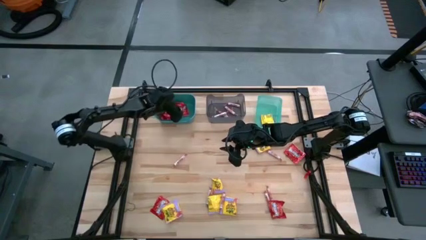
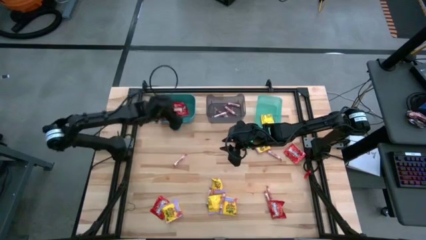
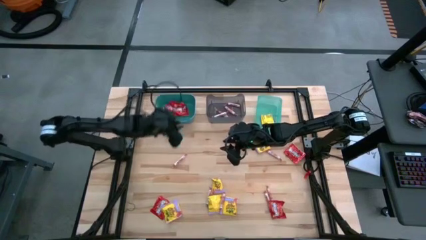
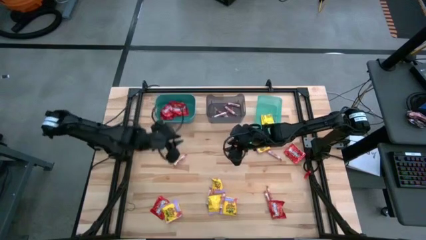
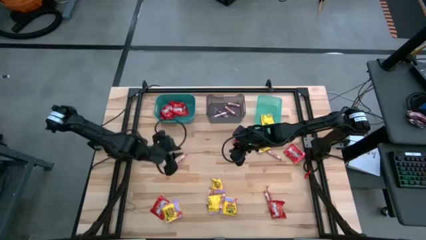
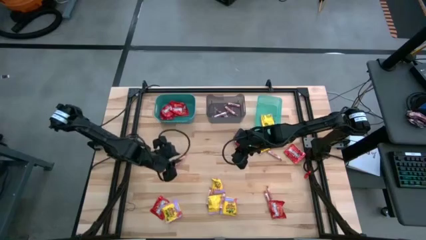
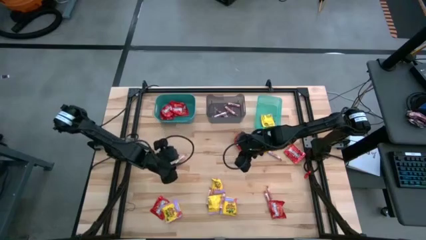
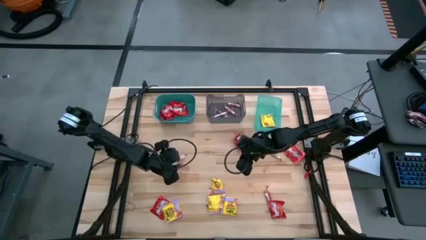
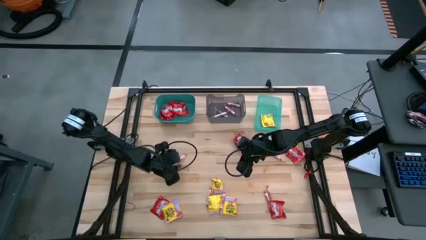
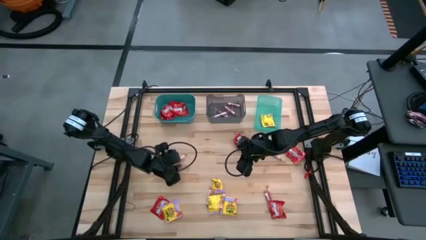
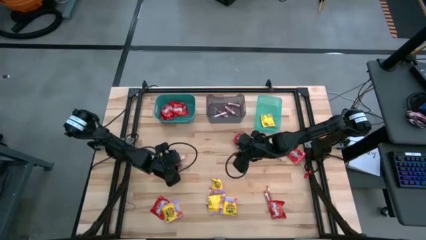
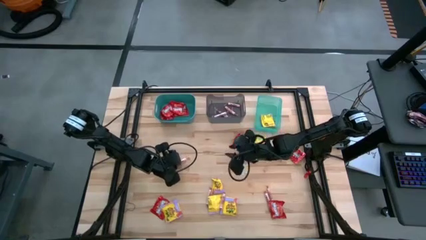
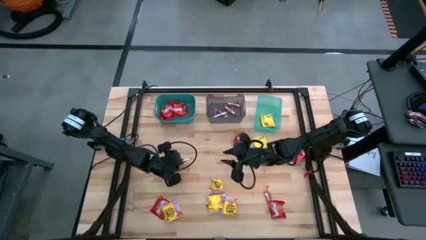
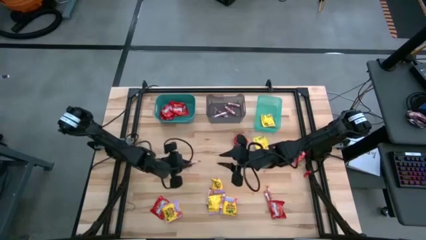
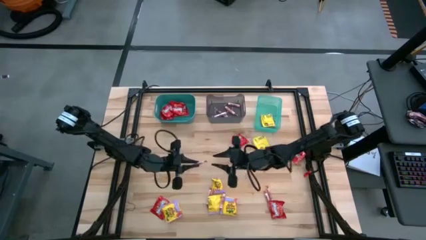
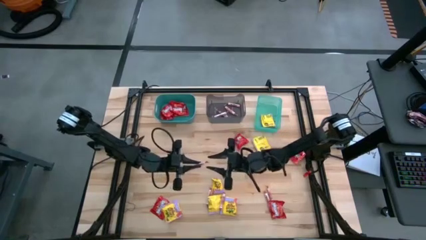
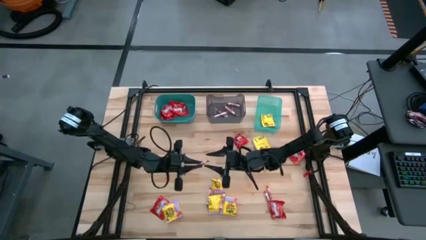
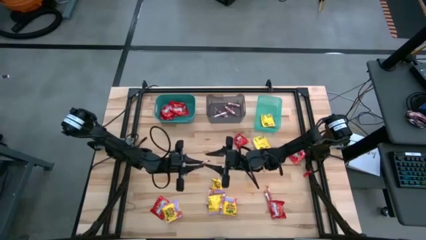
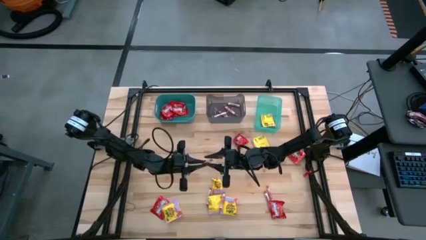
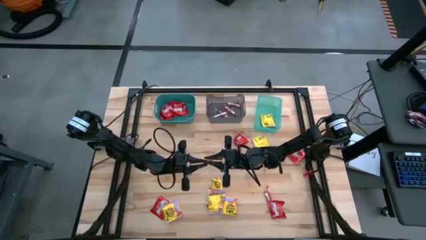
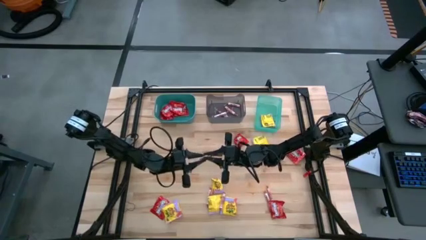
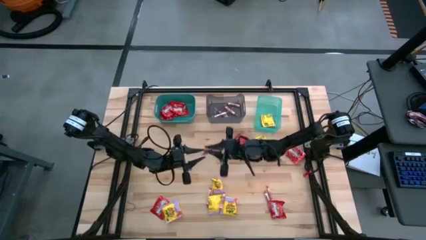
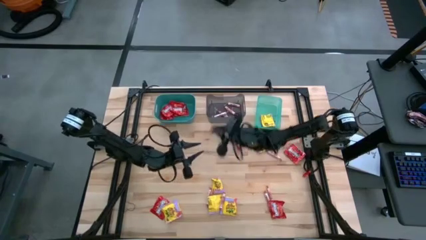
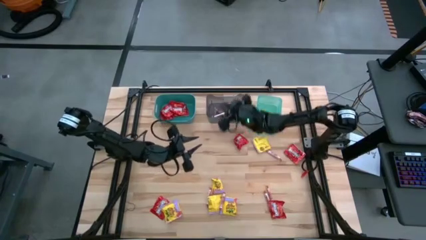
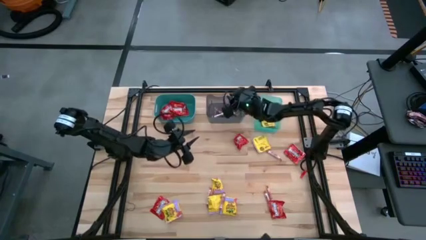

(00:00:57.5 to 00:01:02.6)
Task: Sort candy
Put the white candy into the black bin

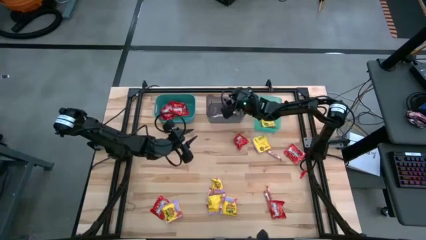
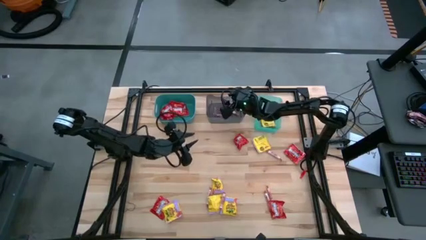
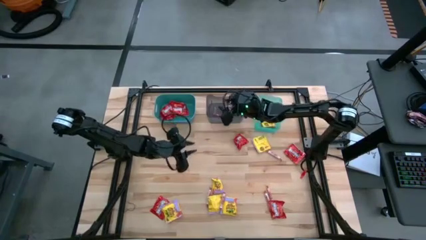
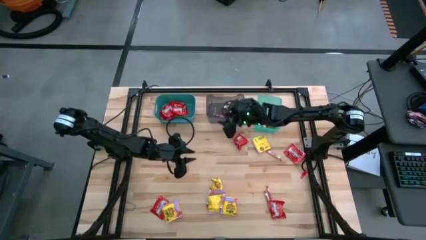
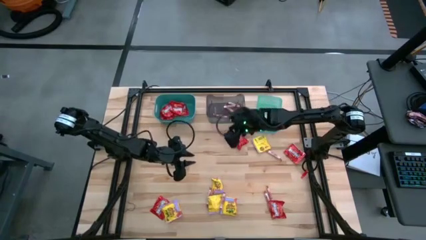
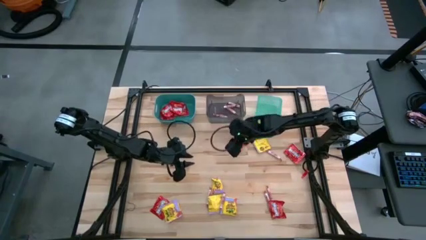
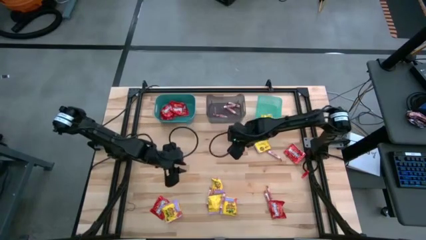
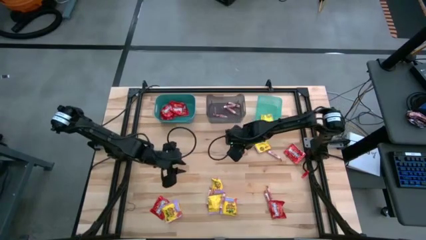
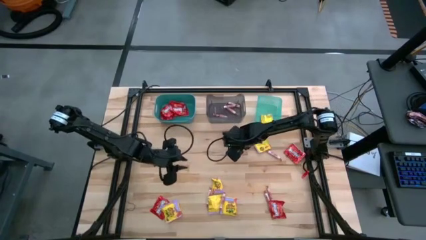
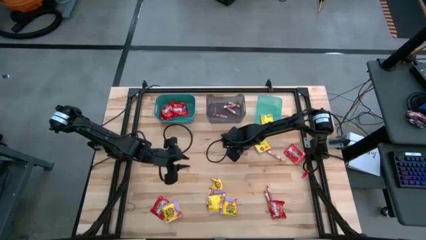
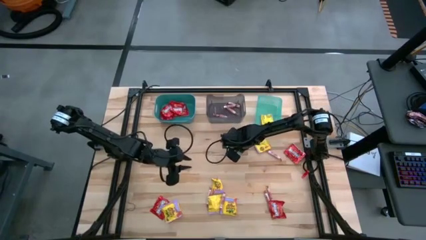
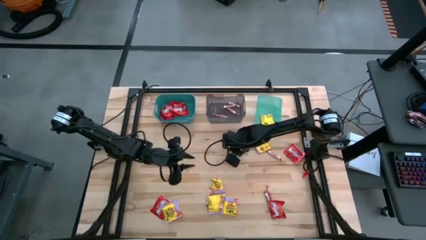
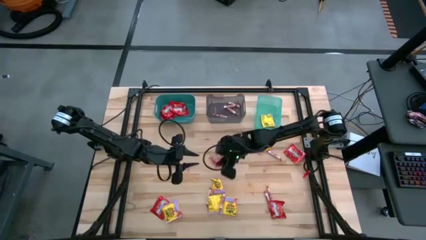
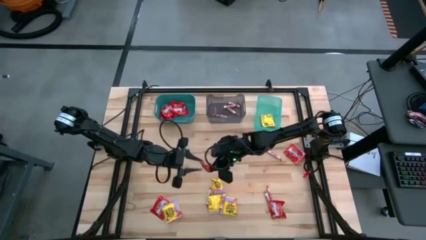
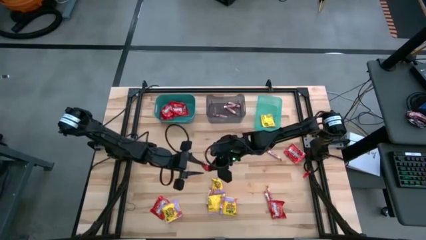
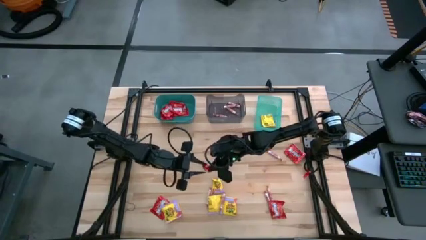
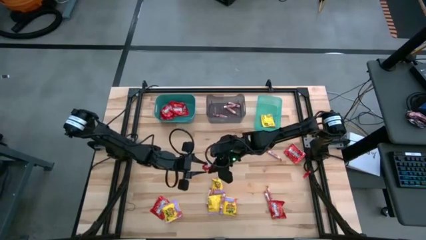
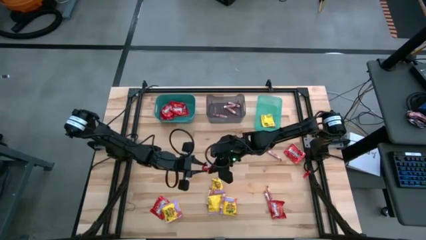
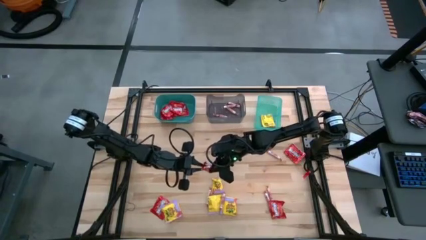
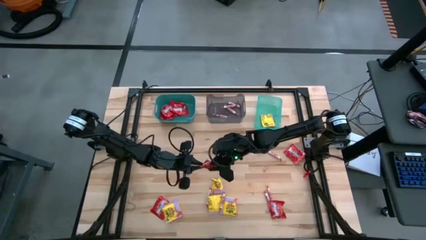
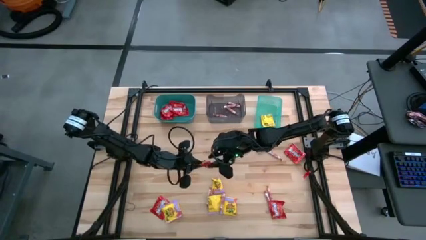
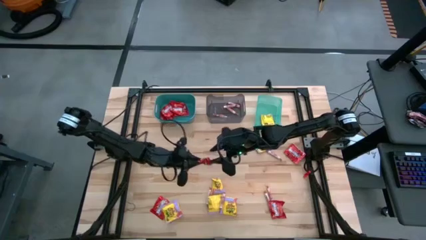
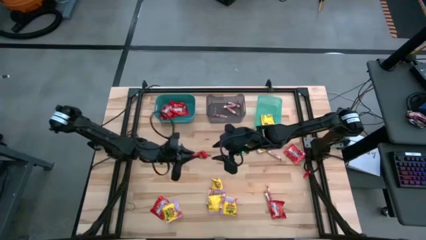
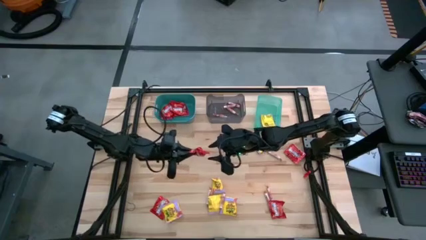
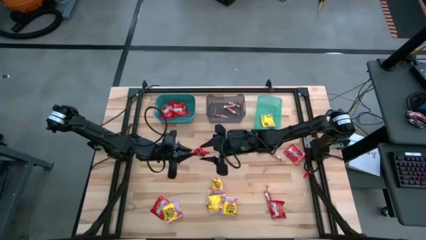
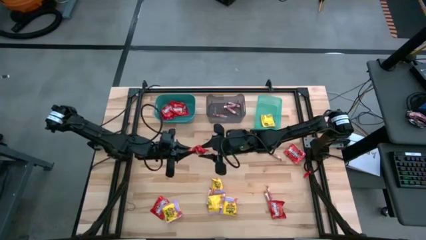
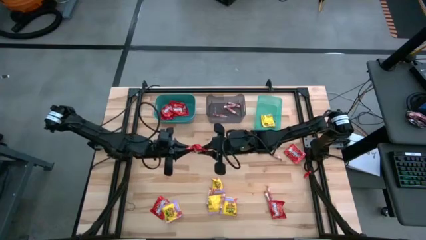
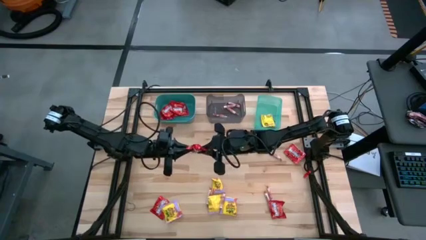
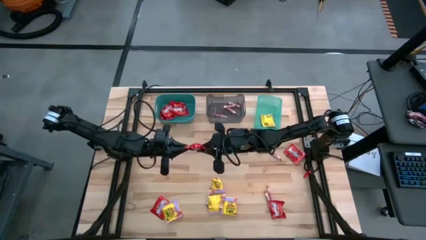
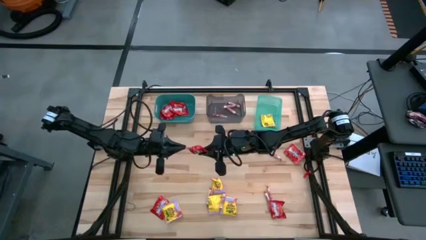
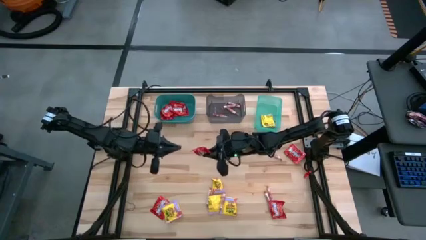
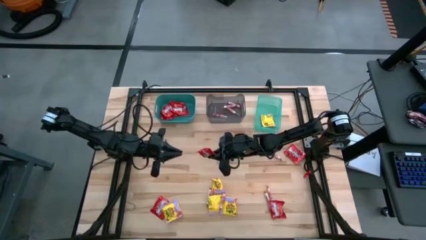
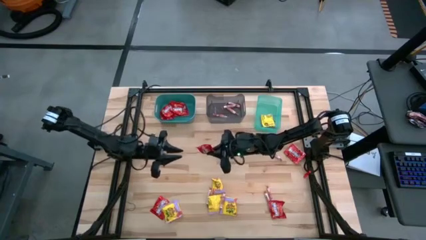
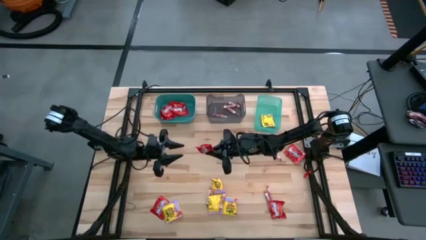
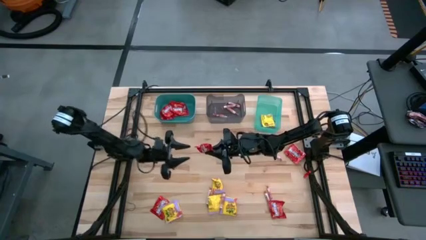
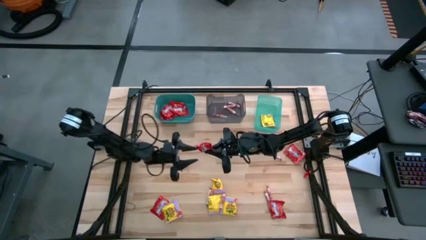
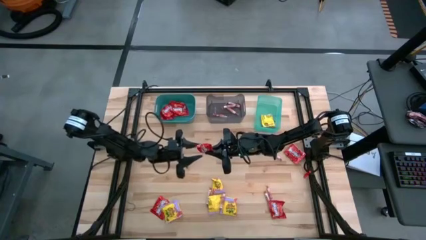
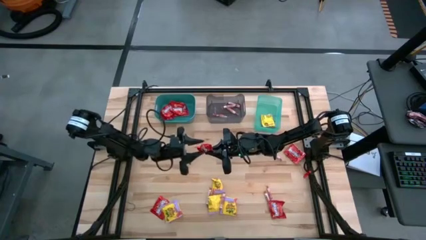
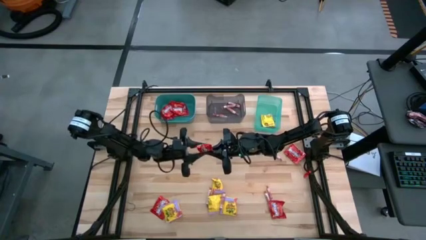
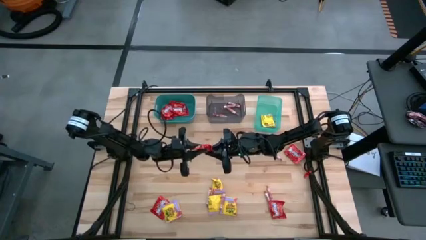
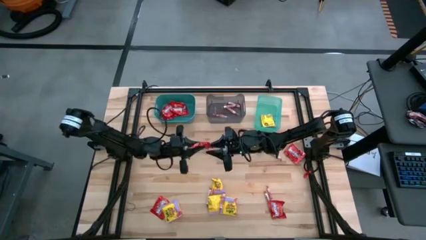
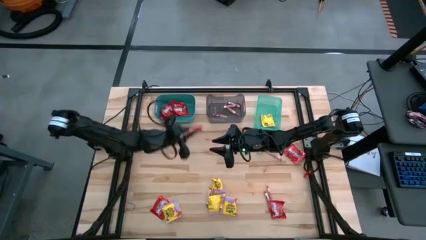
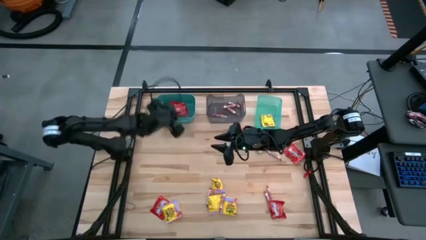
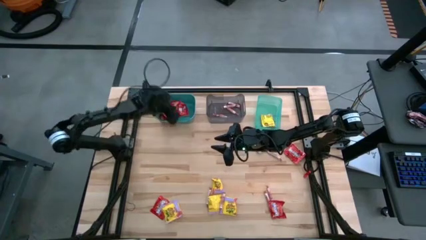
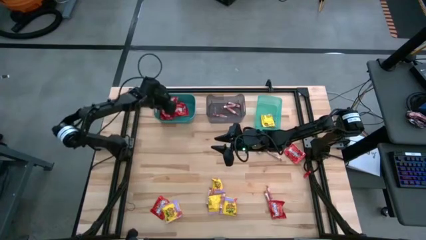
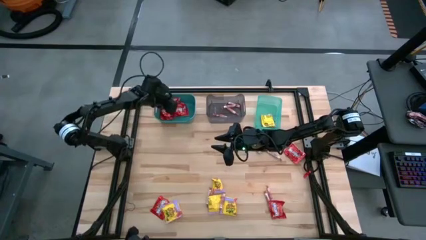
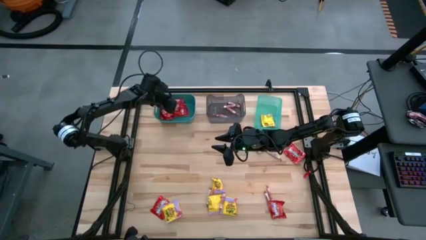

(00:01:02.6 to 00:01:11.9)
Put the red candy into the green bin

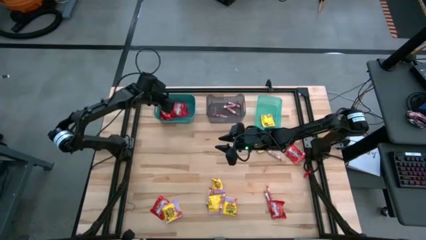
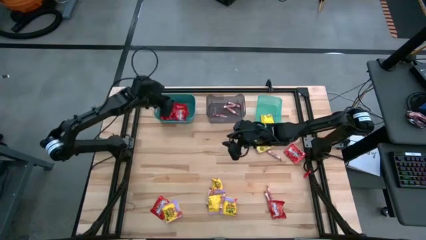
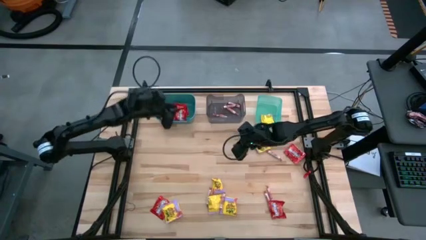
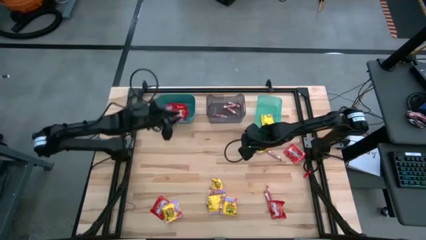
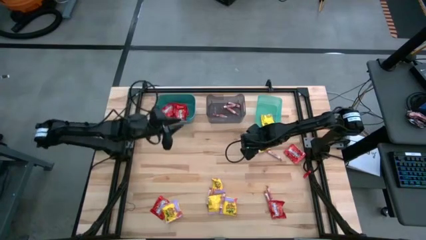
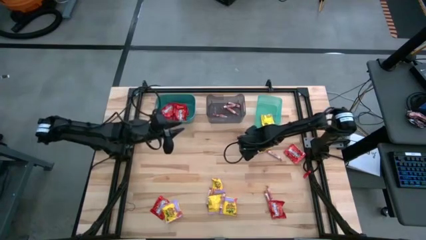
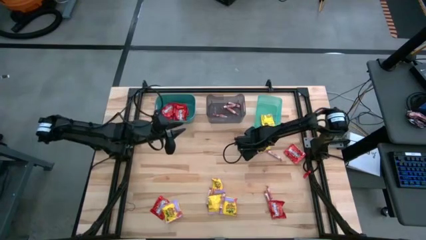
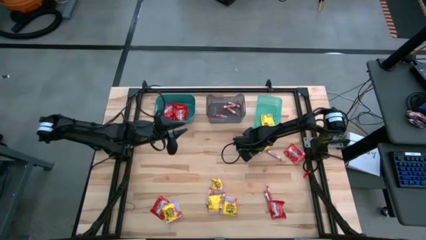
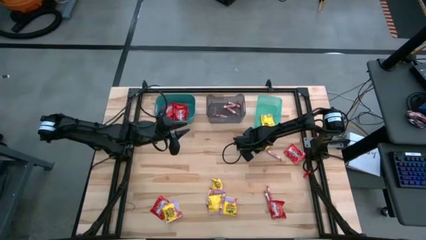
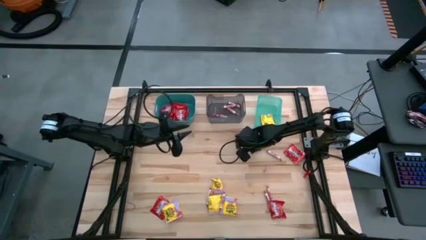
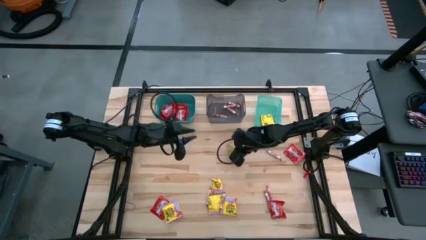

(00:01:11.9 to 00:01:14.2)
Put the yellow candy into the light green bin

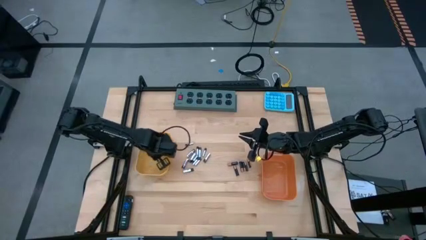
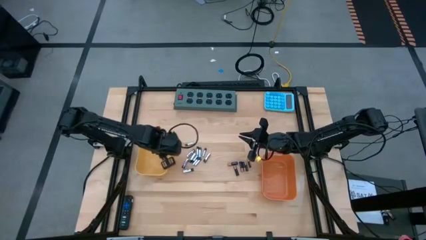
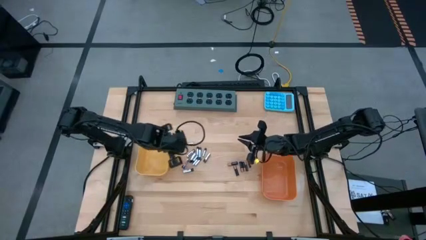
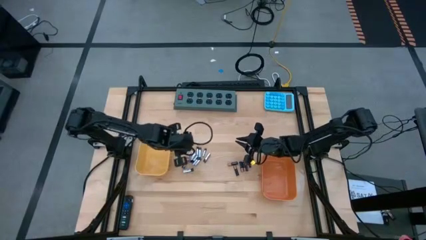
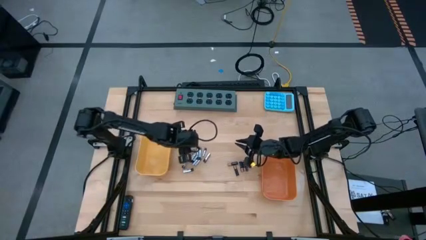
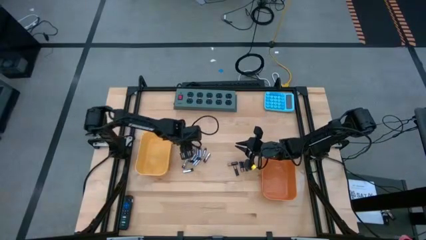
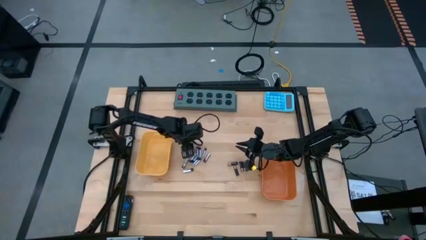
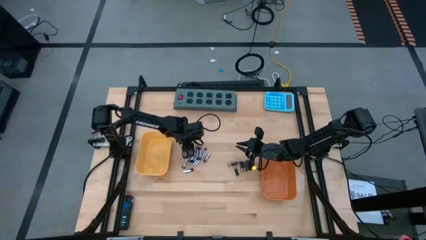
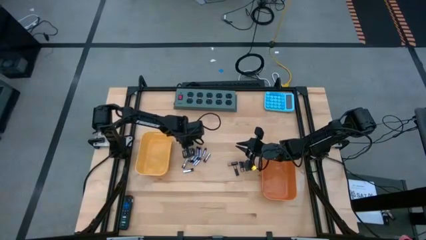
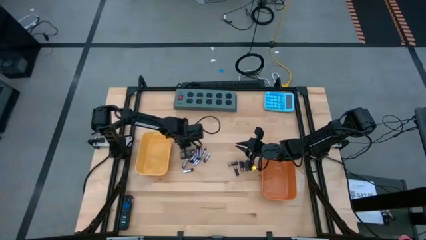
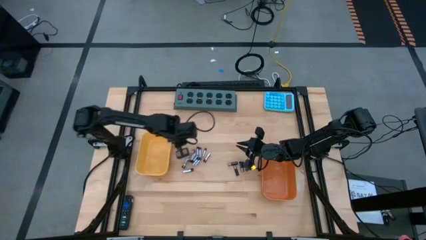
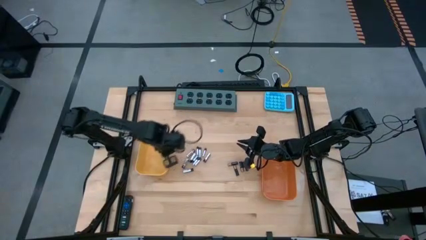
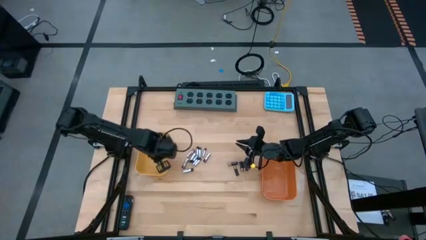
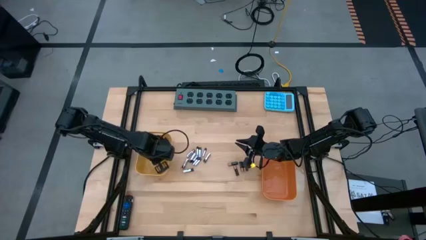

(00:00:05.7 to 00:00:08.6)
Task: Sort batteries
Put the silver battery into the yellow bin
